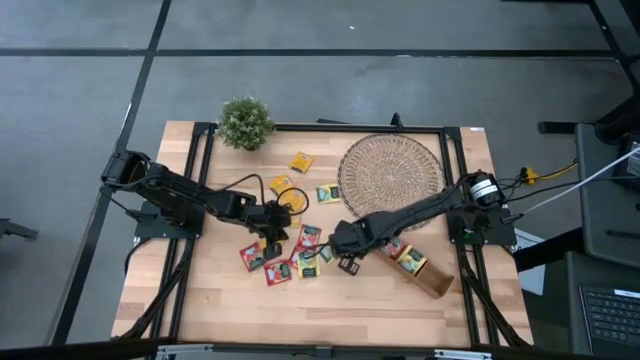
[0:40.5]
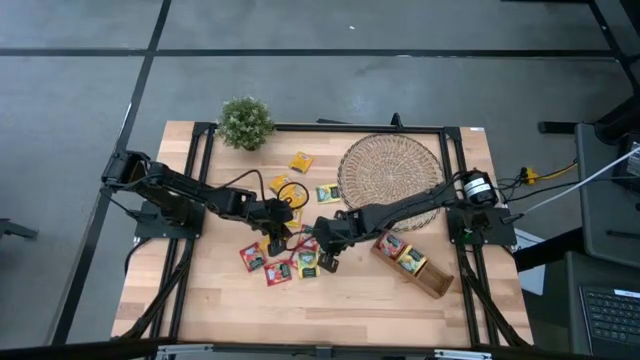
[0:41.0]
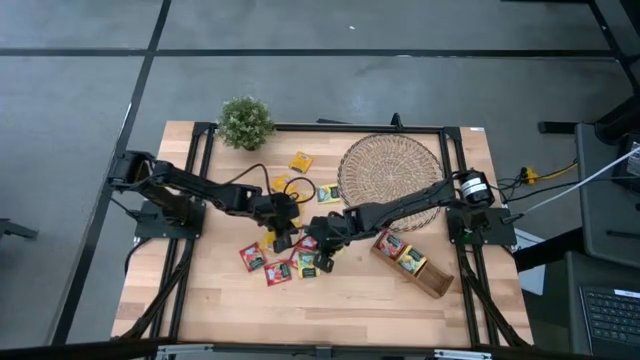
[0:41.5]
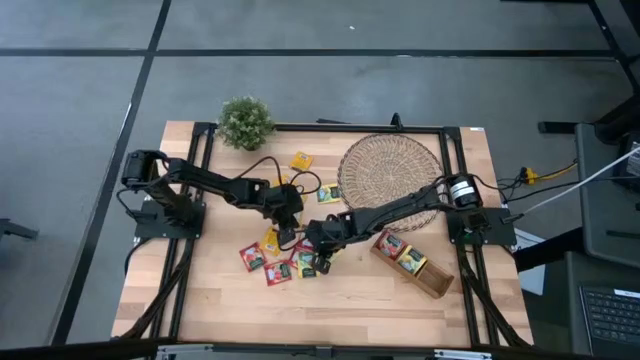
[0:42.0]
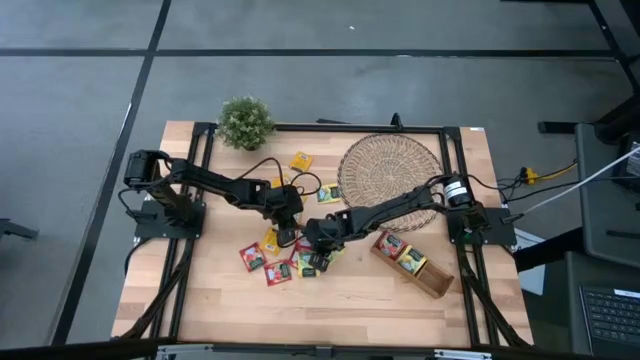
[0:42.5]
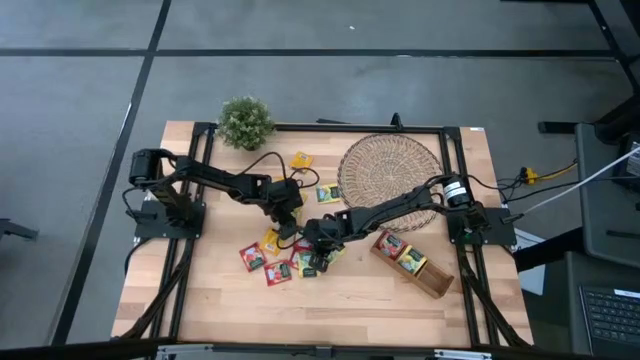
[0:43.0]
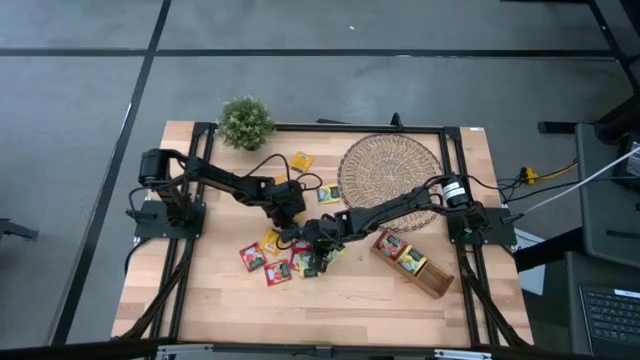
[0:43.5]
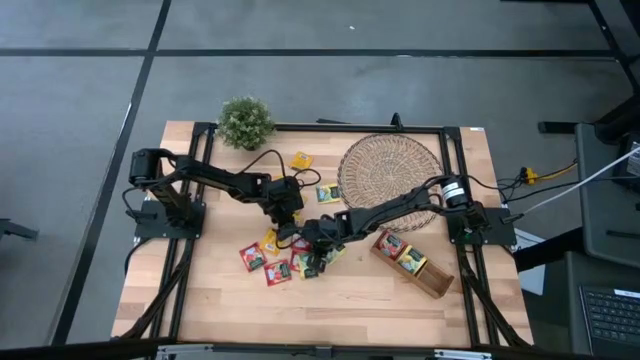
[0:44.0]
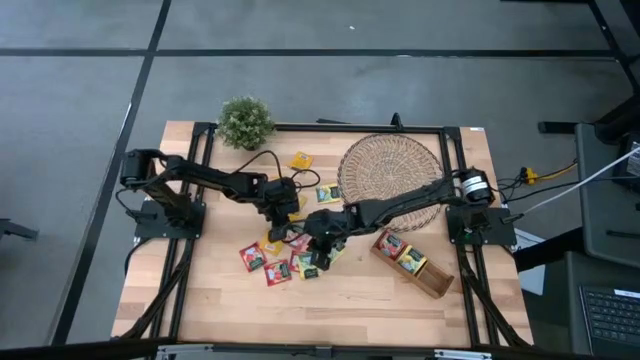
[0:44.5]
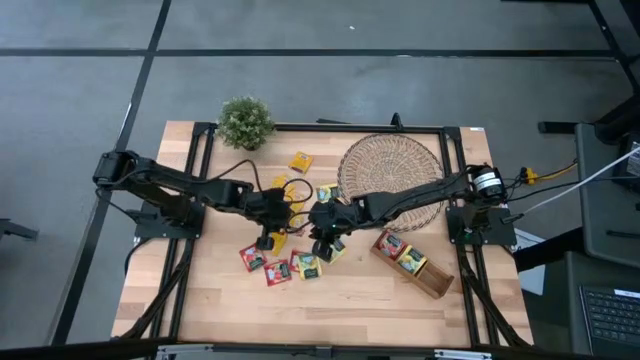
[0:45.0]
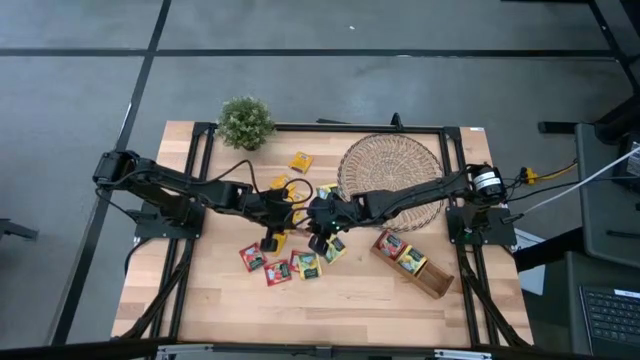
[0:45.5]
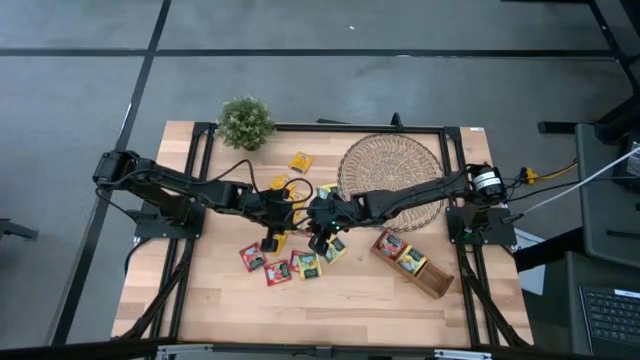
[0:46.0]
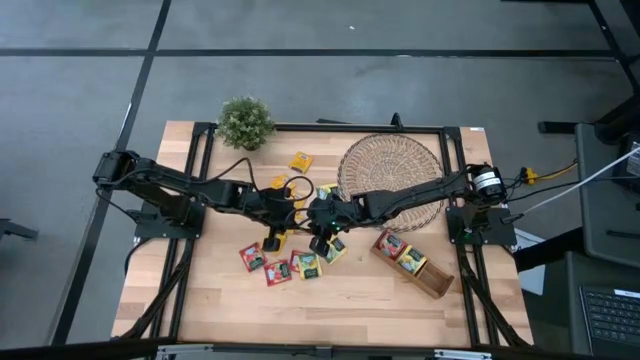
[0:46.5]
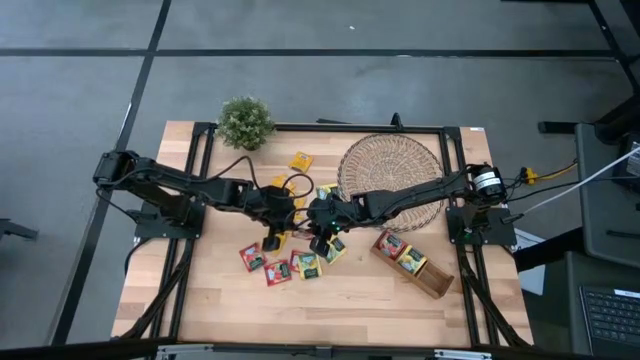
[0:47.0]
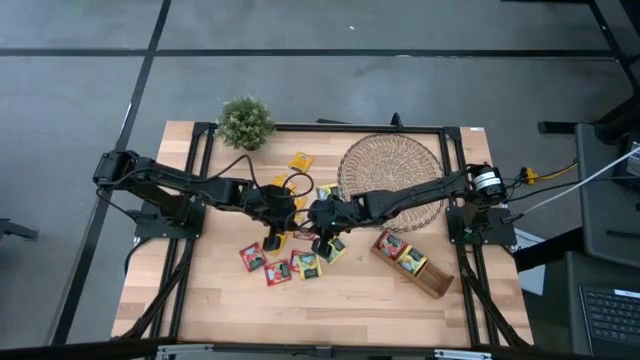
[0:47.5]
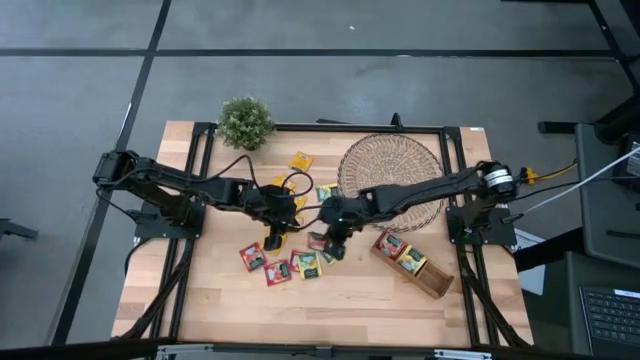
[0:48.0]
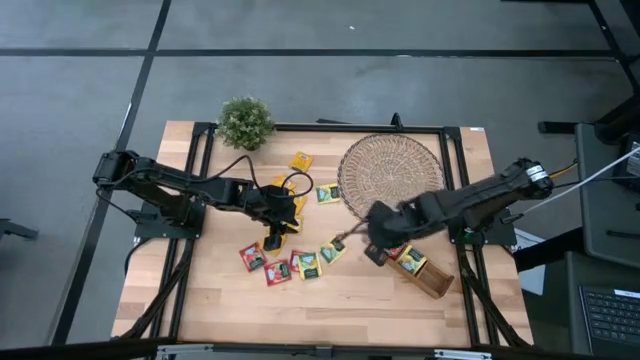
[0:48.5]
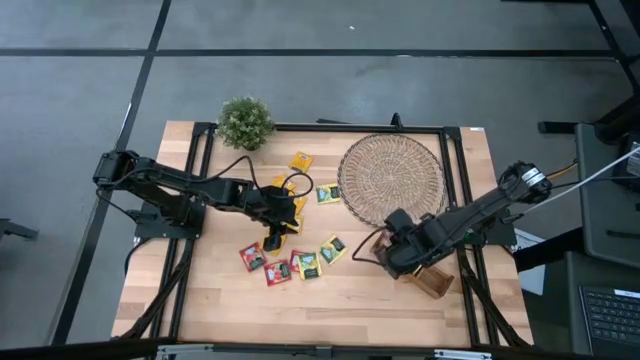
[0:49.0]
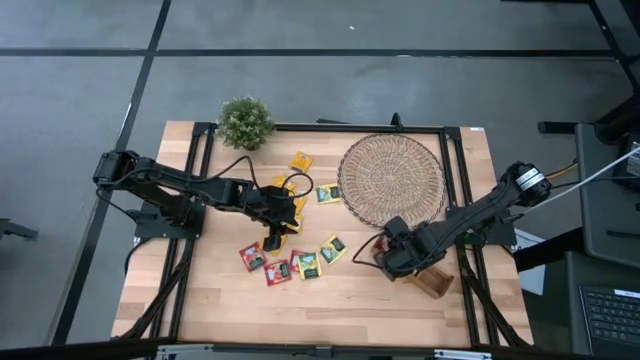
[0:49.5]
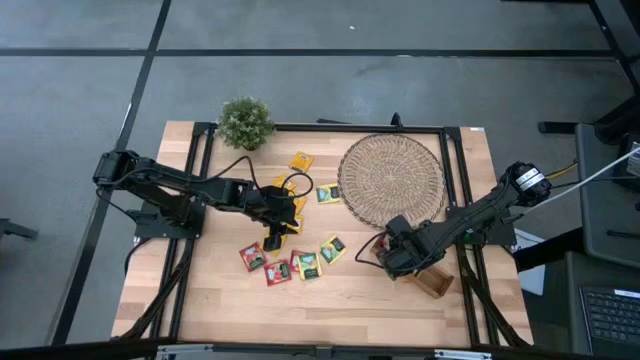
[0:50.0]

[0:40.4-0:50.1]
Task: Pick & Place Tea
Put the red tea bag into the left slot of the wooden organizer

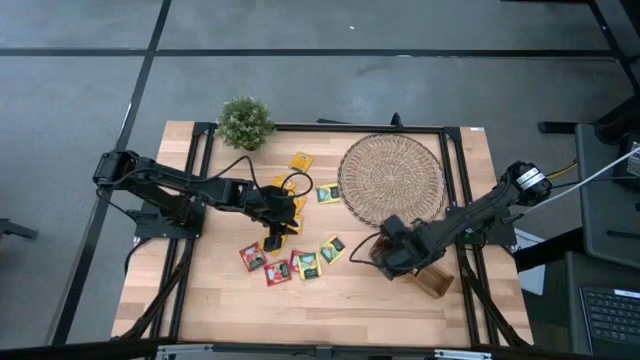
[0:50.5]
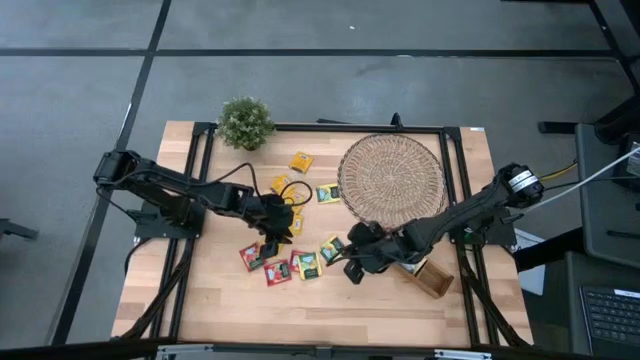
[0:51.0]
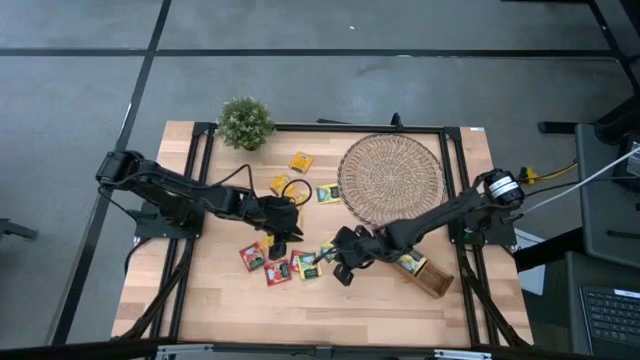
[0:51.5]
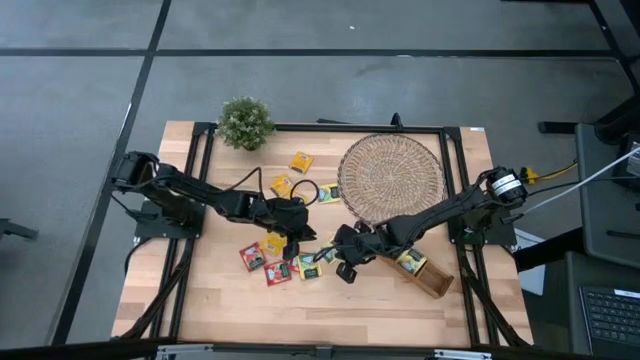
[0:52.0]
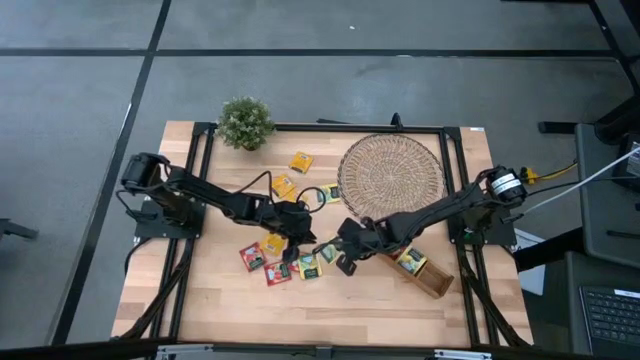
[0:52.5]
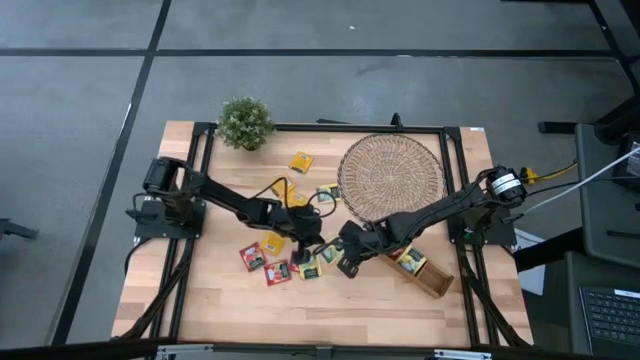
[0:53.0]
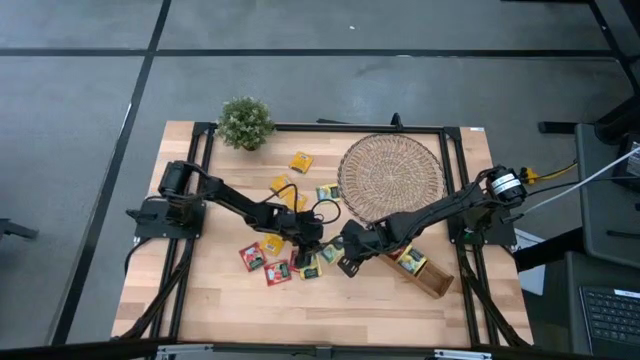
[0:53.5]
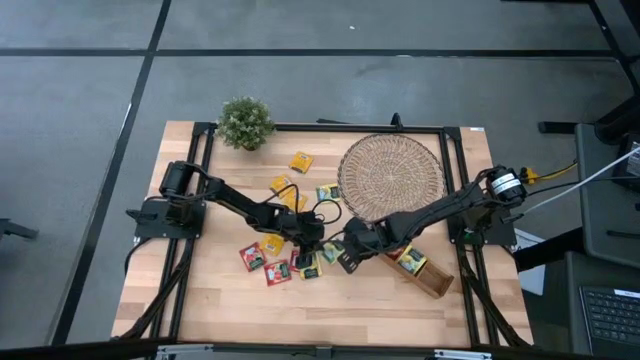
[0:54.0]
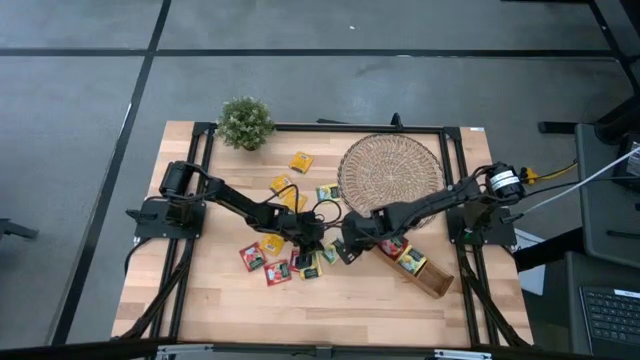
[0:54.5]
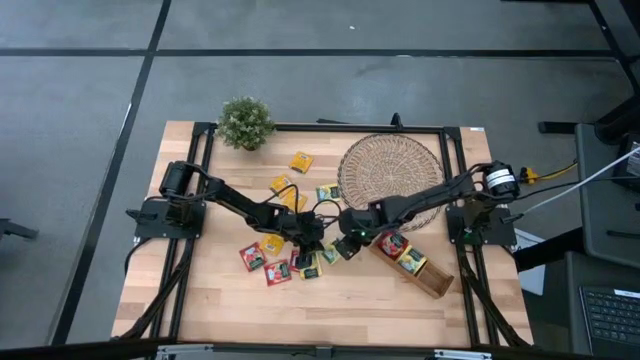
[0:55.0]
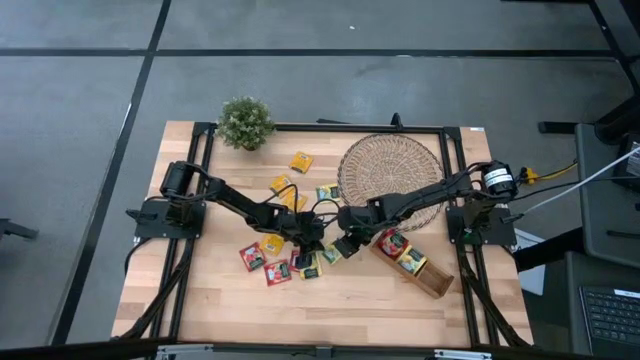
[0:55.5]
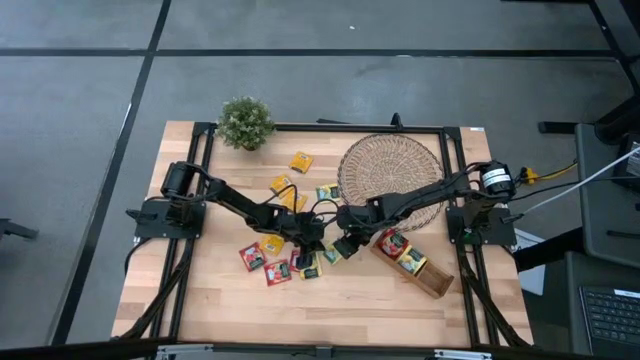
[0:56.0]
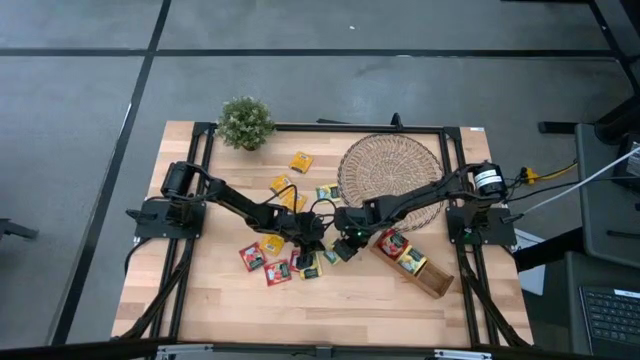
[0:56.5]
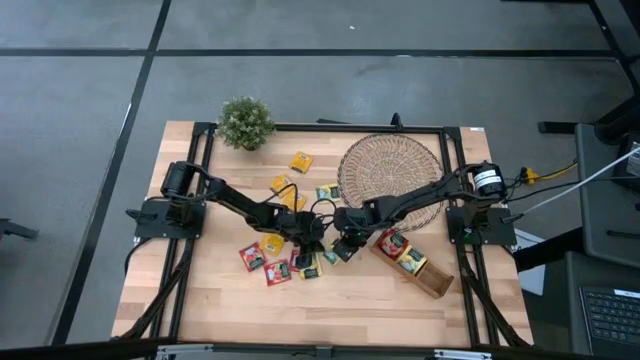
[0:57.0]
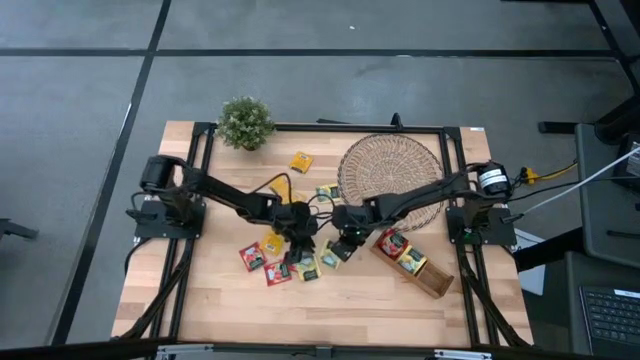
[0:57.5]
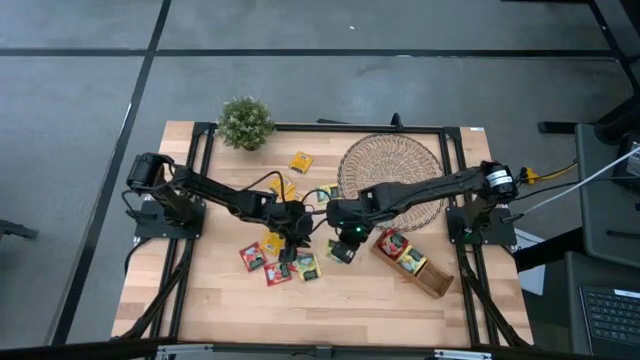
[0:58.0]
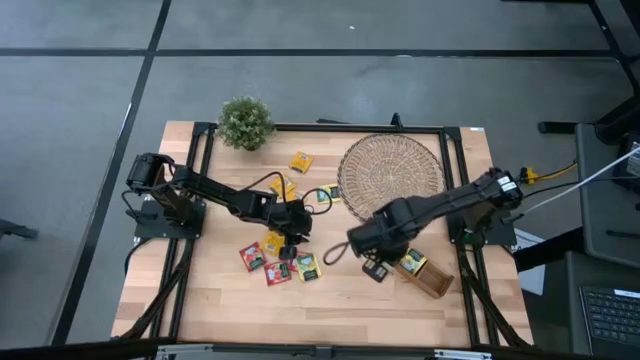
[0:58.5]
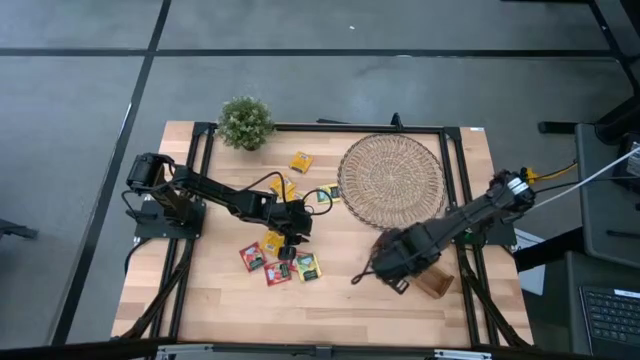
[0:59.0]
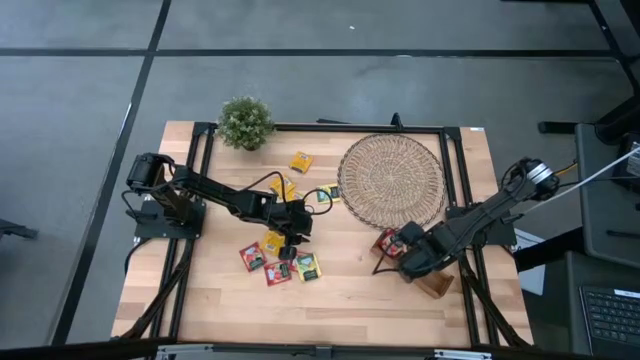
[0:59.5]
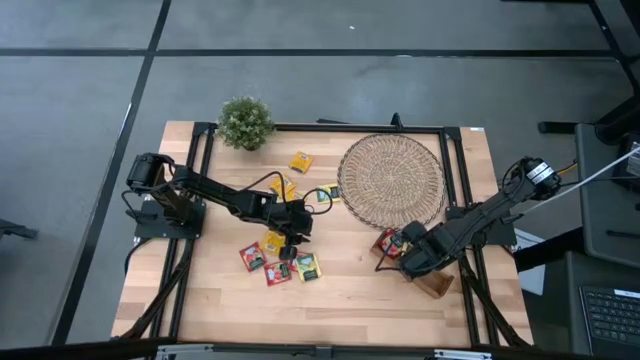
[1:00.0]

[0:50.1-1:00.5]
Put the middle yellow tea bag into the middle slot of the wooden organizer

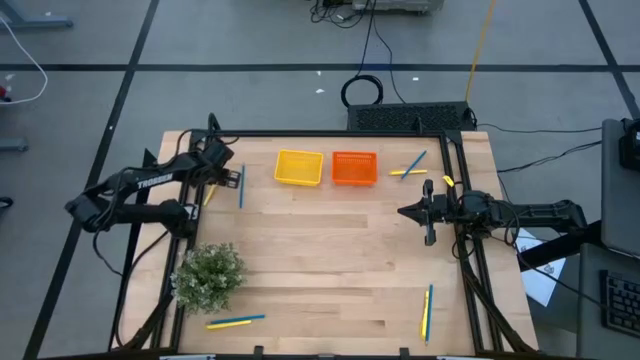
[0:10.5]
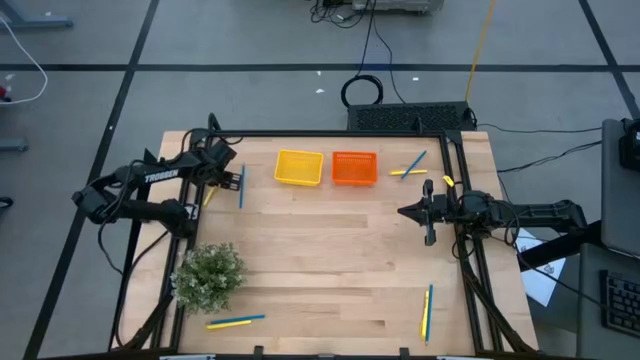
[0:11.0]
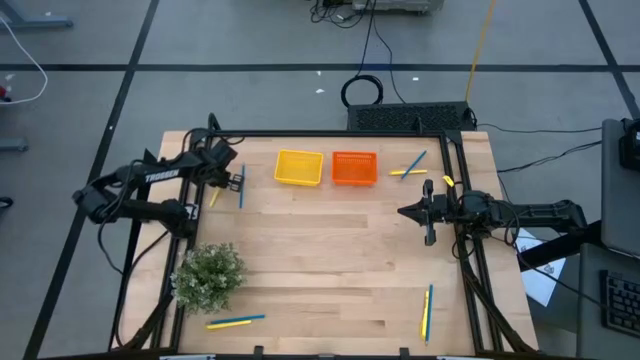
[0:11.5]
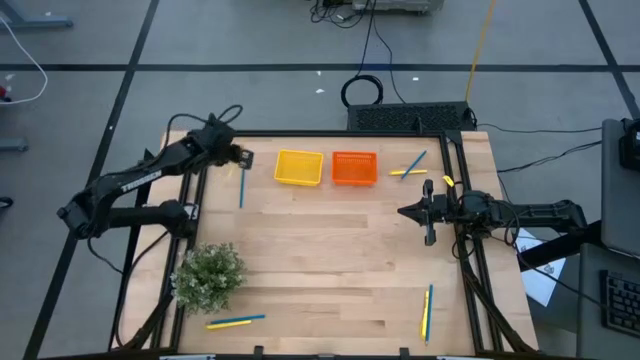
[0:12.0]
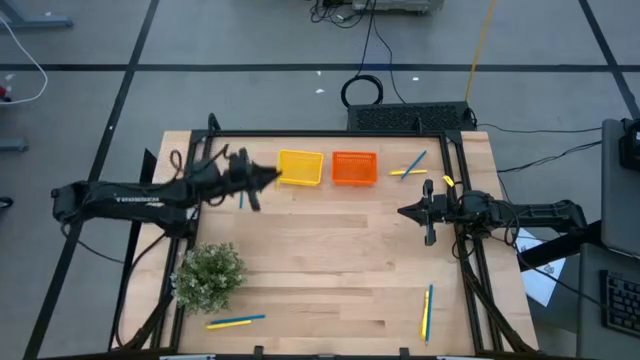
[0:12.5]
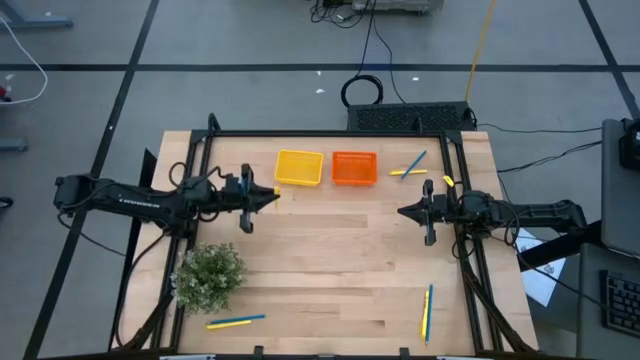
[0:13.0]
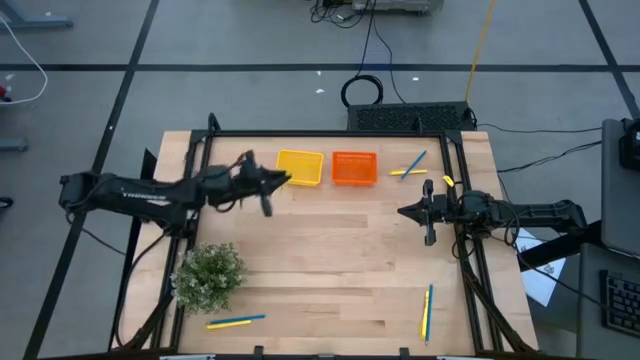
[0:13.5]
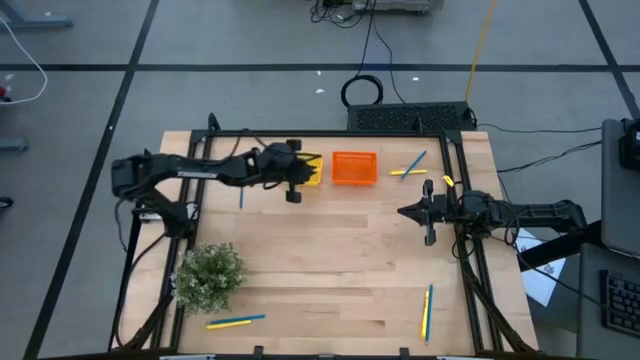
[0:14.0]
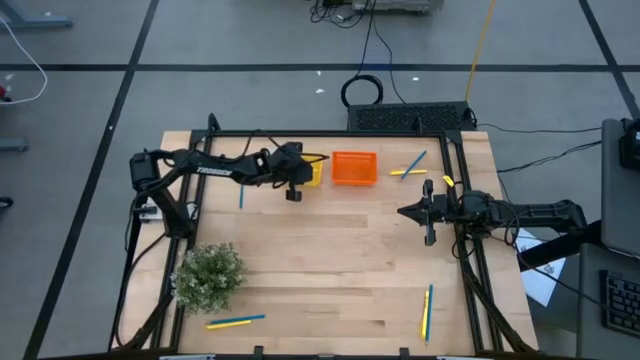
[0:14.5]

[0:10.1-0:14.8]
Task: Sort pens & pencils
Put the top left yellow pen into the yellow bin
